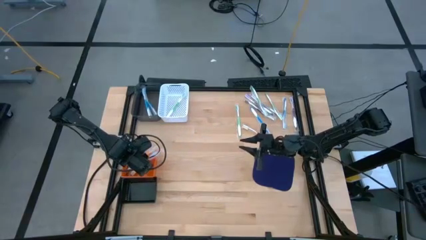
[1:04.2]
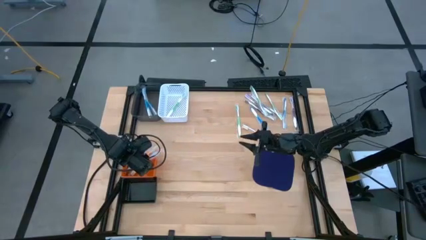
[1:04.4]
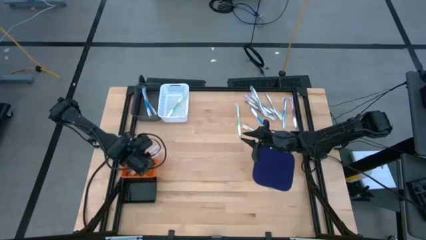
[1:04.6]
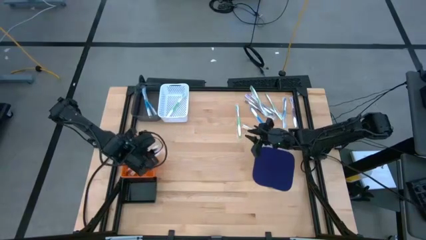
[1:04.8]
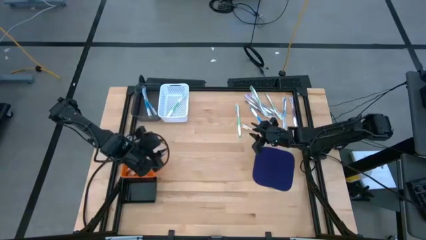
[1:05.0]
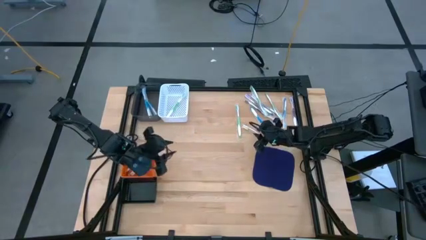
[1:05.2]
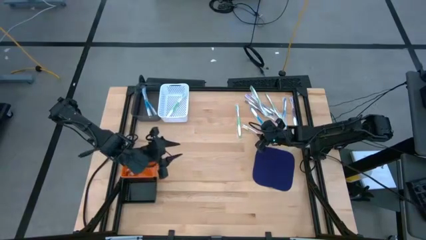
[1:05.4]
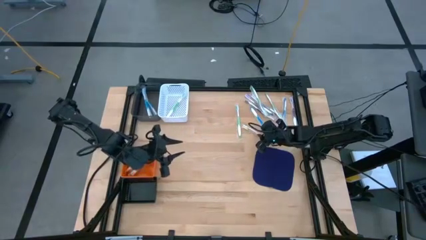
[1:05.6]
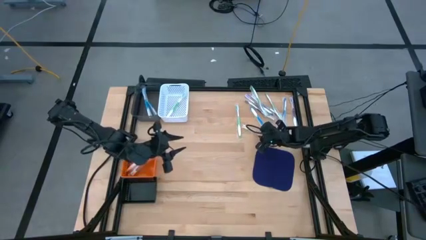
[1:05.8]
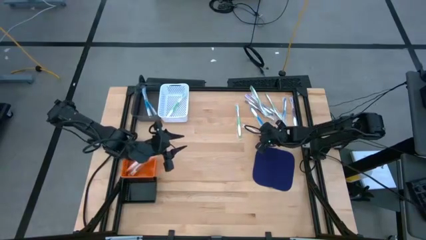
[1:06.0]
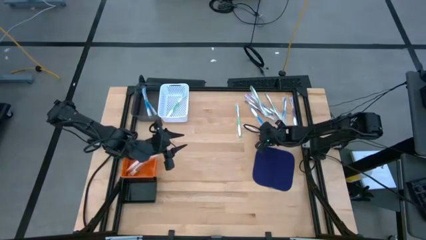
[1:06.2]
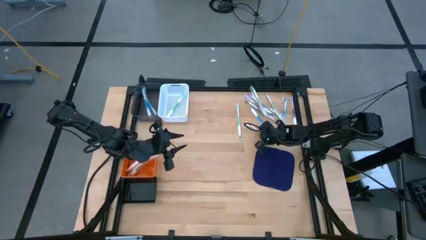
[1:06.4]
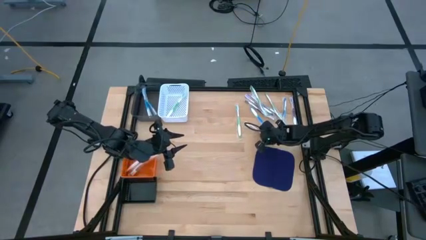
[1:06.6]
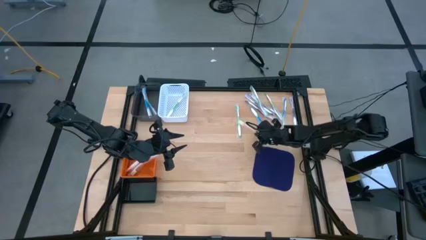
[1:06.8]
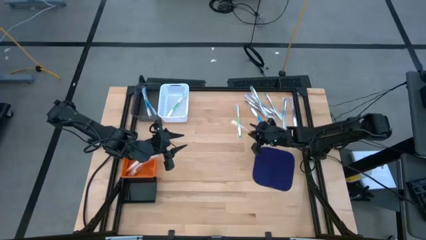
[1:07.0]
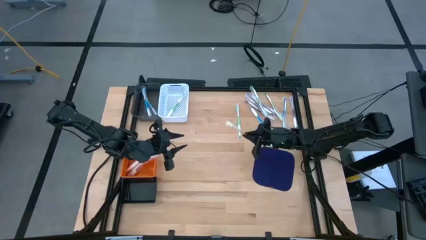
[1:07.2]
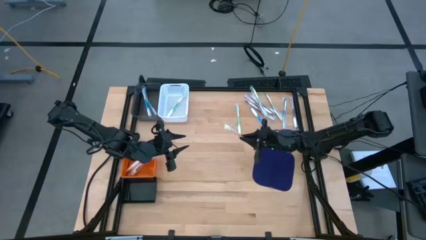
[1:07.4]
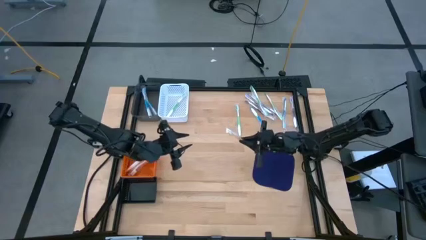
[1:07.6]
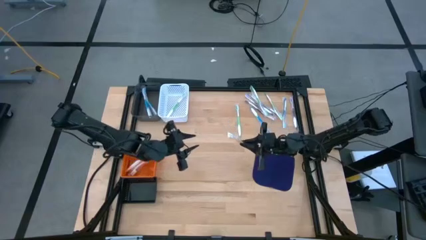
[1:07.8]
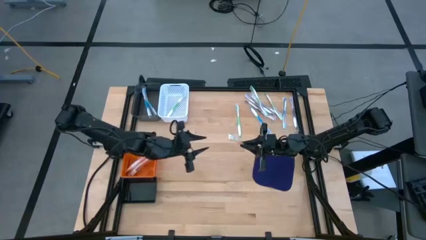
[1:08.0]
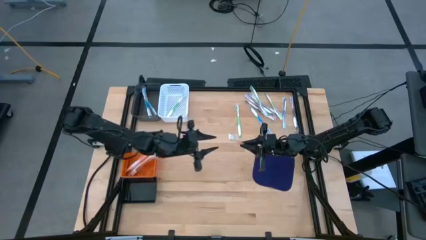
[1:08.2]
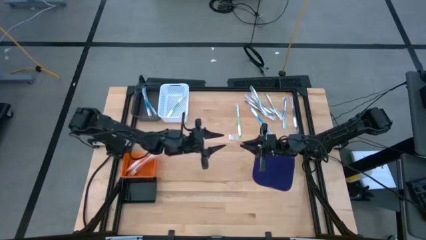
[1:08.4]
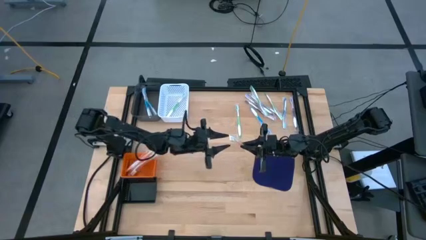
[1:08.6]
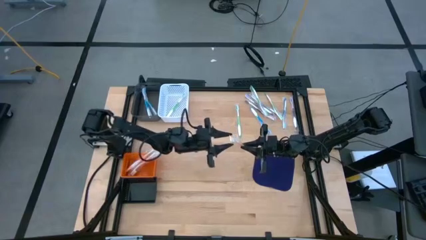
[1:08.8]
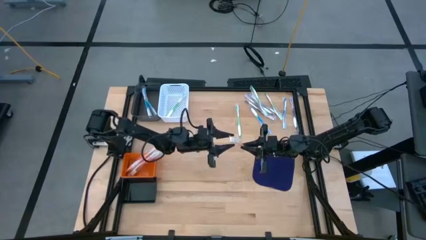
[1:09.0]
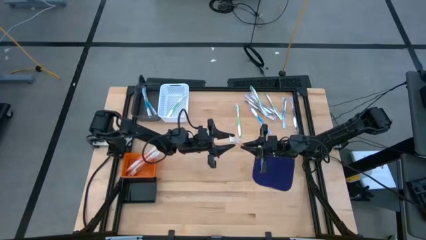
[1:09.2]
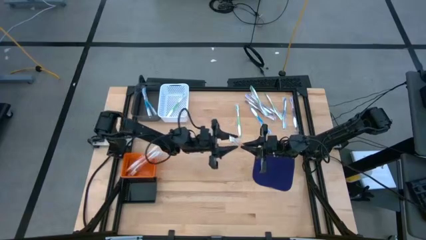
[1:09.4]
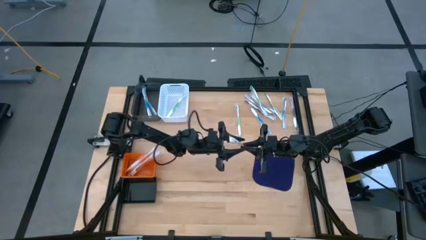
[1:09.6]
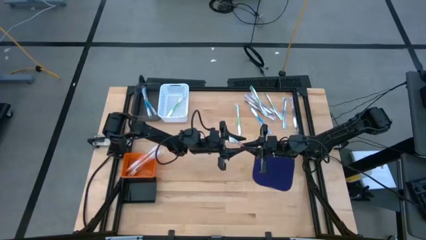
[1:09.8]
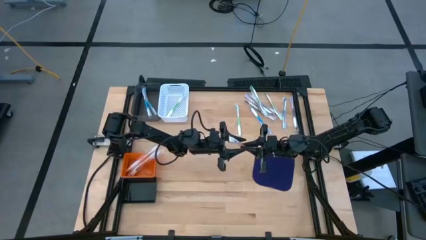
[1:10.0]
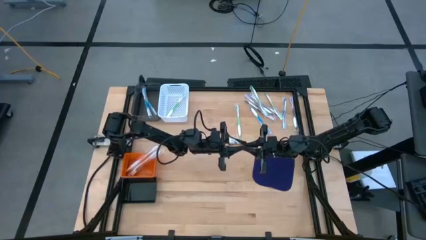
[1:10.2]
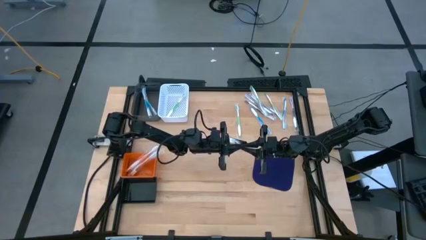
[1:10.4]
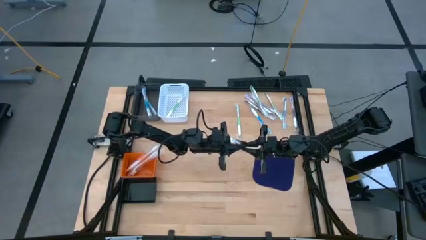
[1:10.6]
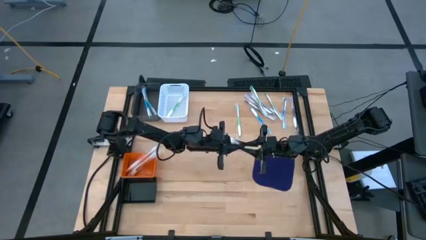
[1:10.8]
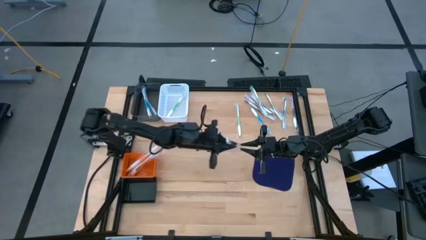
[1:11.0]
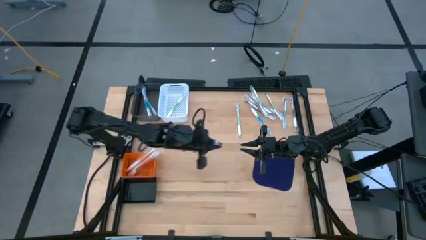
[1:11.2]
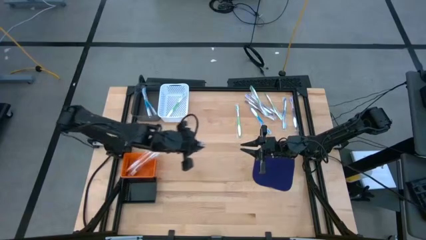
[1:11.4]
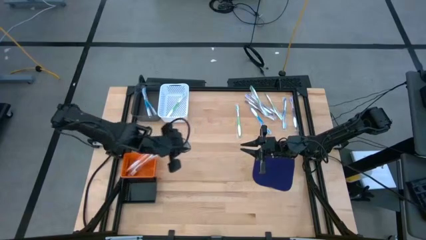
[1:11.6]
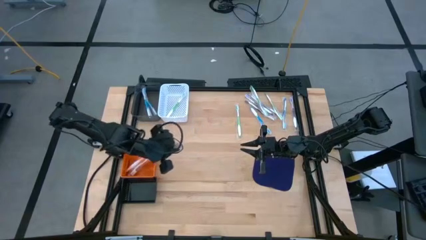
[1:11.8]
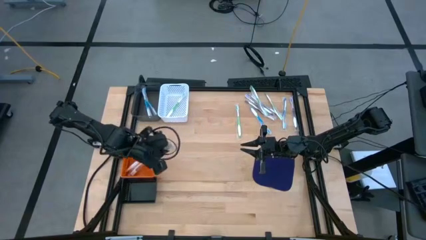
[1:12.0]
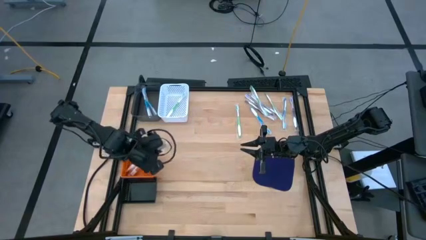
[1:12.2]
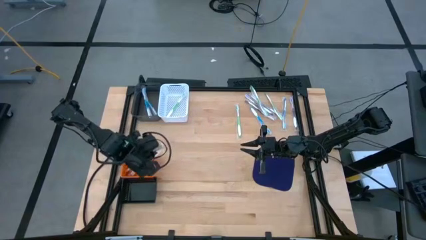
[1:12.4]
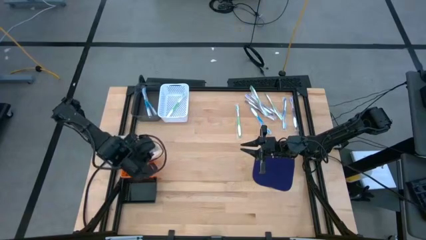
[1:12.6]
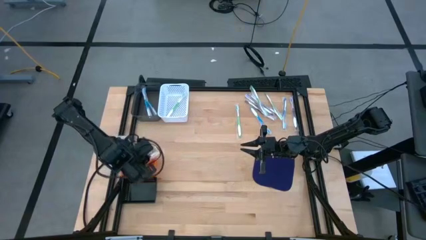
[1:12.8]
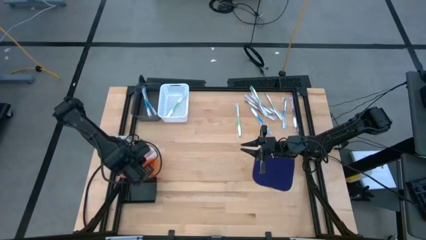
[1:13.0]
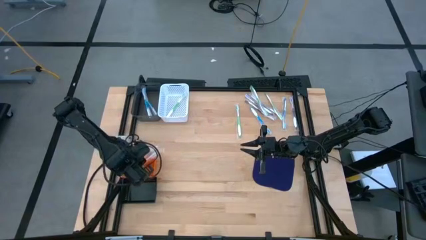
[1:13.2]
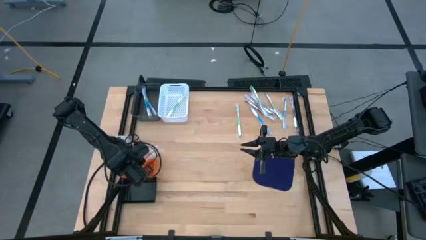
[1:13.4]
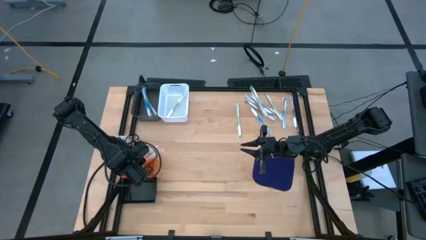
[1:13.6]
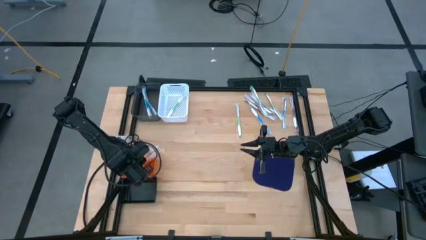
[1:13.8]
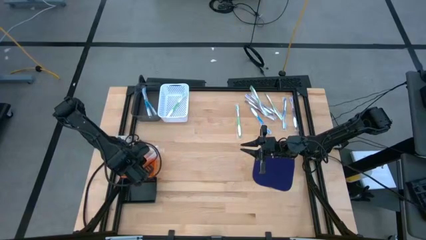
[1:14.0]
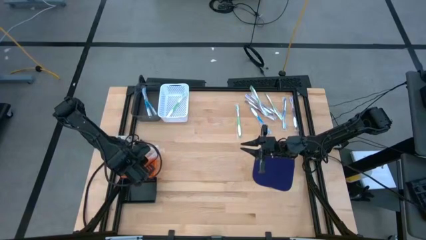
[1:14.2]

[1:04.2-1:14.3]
Task: Pick & Place Toothbrushes
Put the orange toothbrush into the orange bin

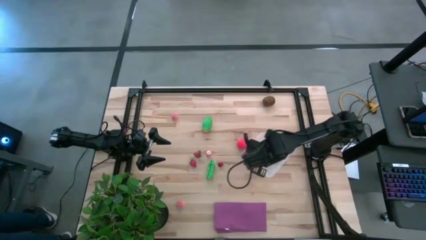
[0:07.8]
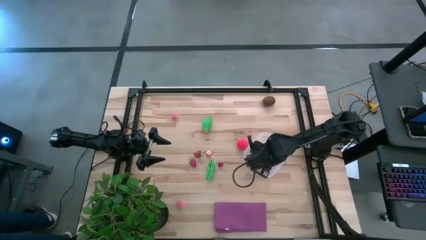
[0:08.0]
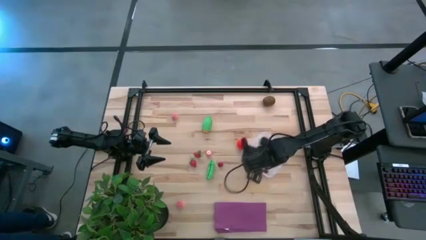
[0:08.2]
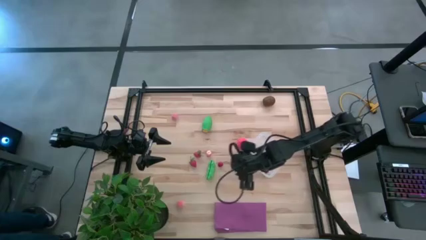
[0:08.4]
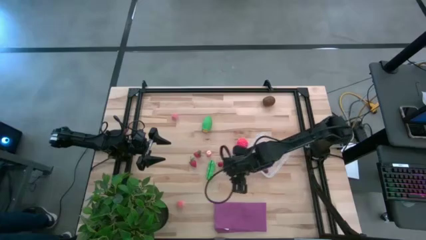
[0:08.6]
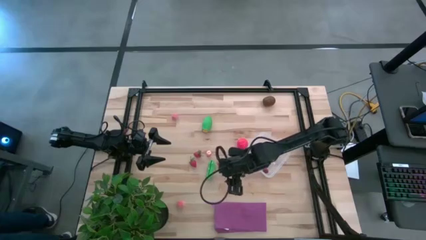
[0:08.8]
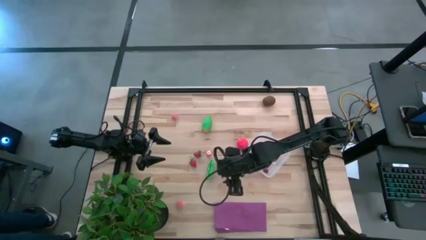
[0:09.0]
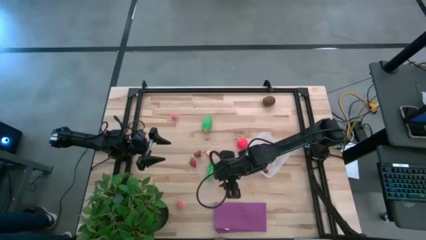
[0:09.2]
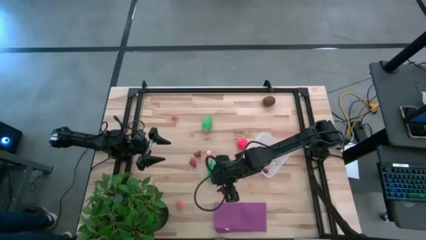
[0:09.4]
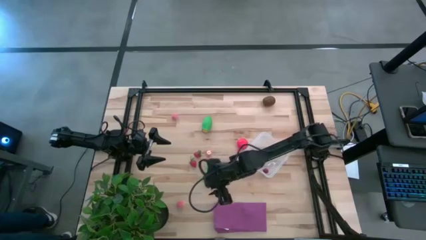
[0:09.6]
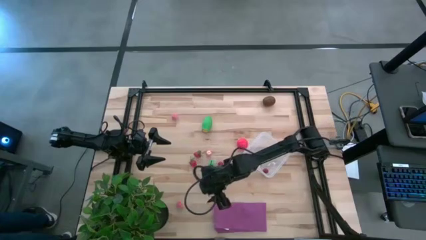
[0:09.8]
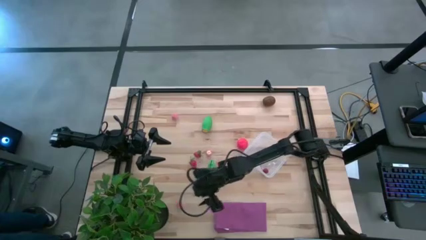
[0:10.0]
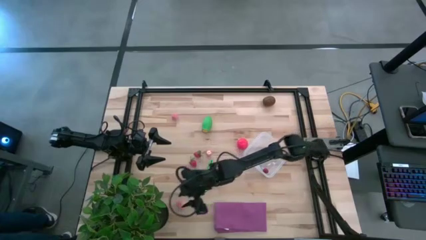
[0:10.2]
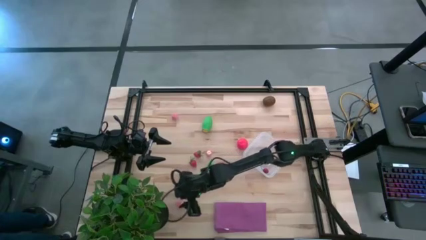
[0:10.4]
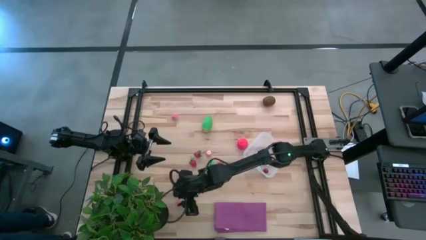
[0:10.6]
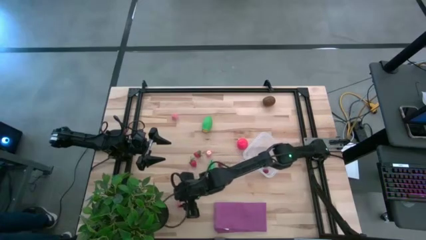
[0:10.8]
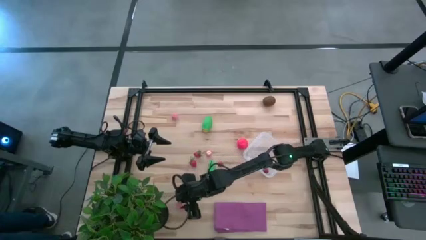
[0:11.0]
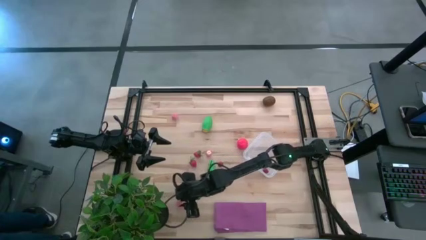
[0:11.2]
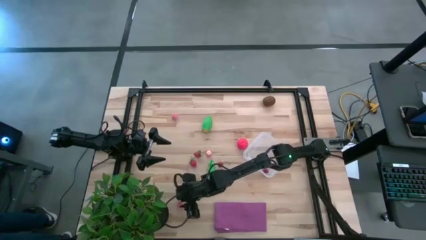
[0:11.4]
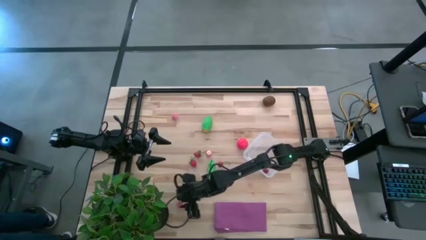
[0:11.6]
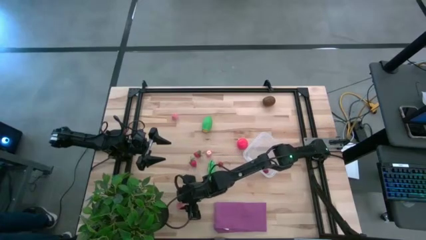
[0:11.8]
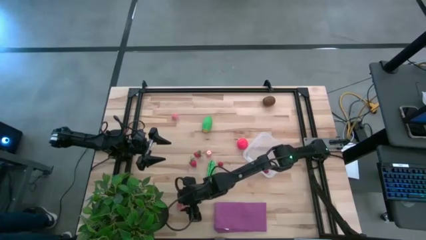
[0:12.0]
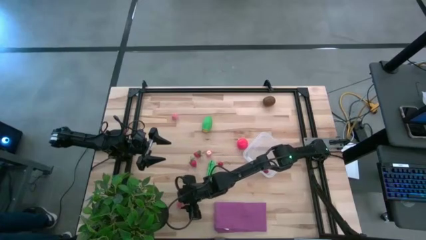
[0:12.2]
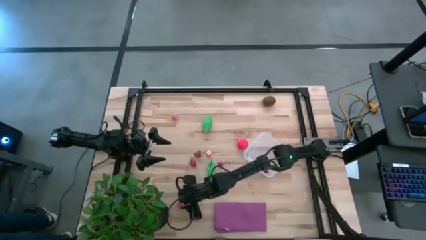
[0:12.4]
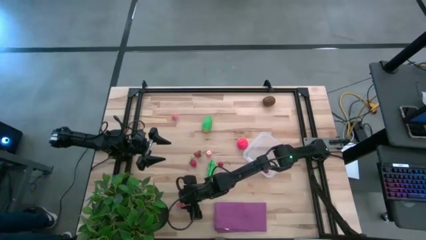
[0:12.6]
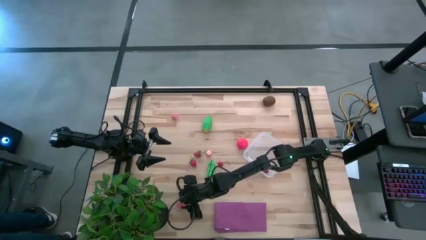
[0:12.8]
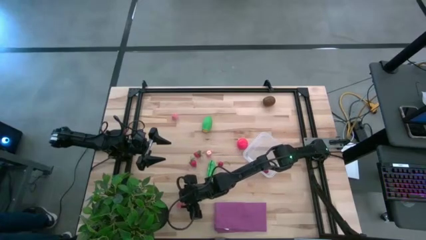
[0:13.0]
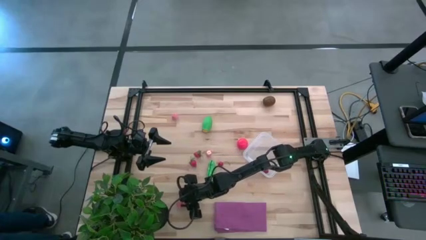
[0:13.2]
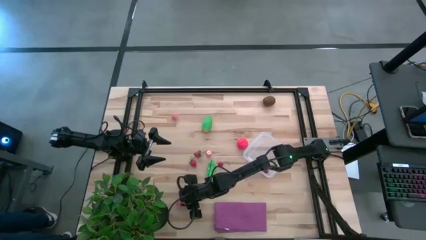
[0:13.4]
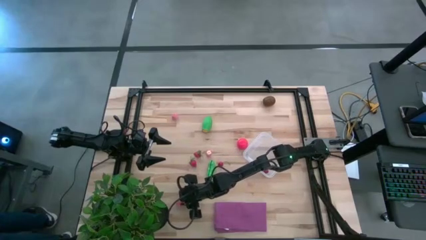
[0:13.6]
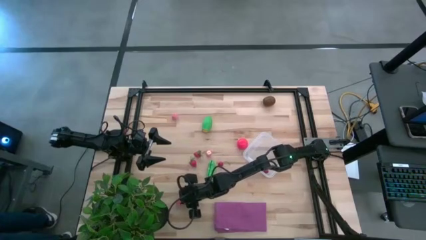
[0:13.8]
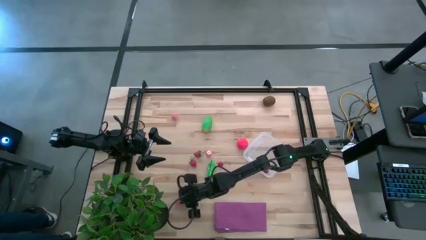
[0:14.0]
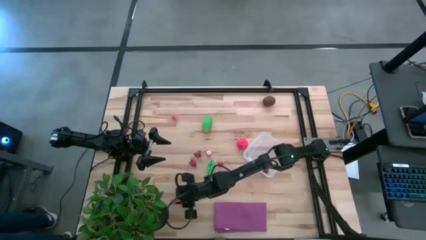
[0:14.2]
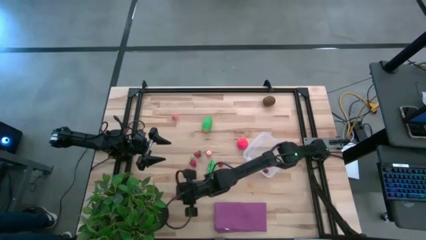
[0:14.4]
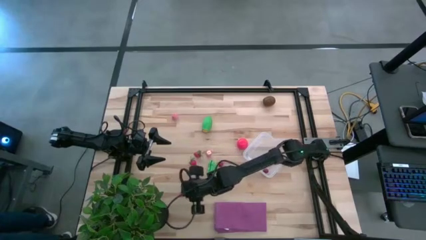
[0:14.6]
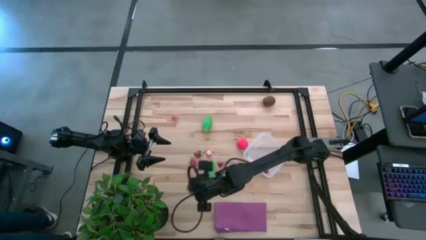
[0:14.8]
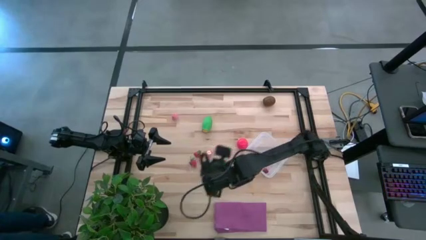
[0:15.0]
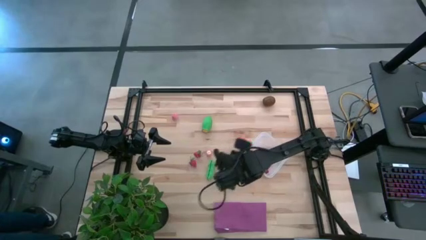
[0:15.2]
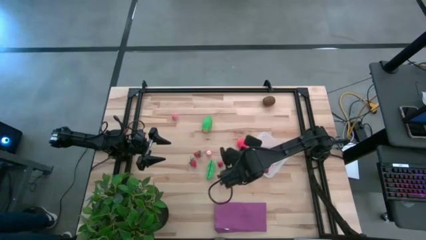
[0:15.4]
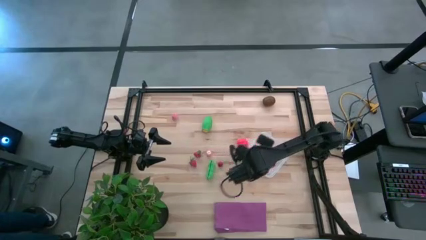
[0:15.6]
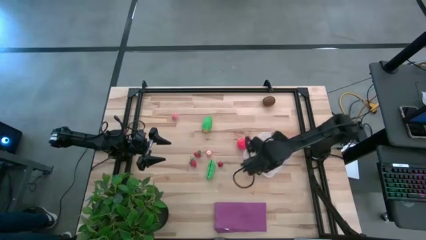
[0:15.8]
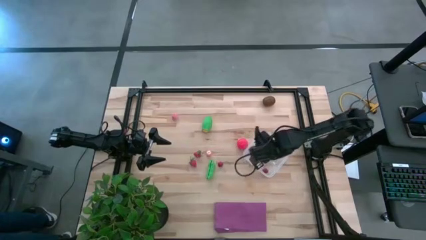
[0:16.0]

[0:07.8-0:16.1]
Task: Pick and placing Produce into tupperware
Put the bottom pink peach into the transparent bin
